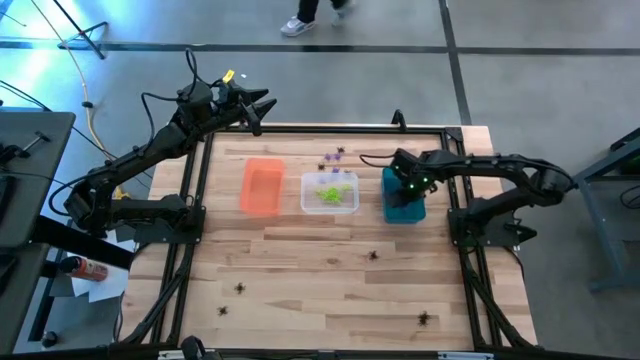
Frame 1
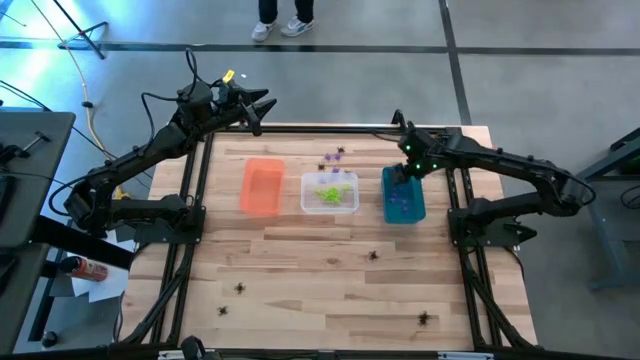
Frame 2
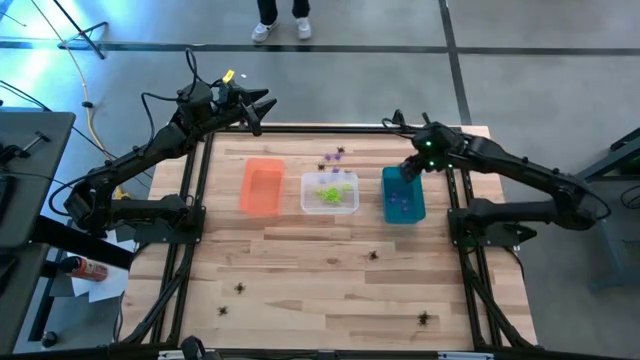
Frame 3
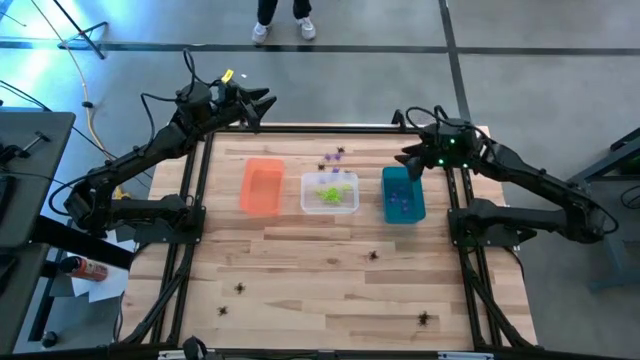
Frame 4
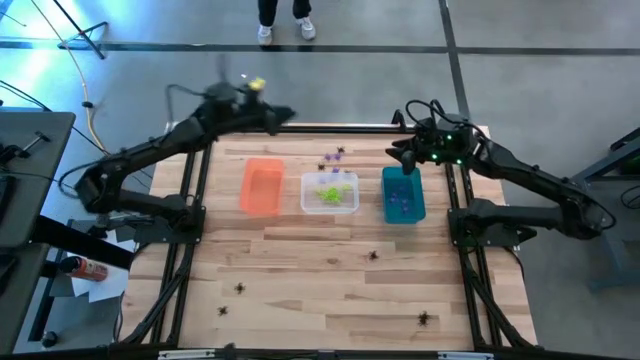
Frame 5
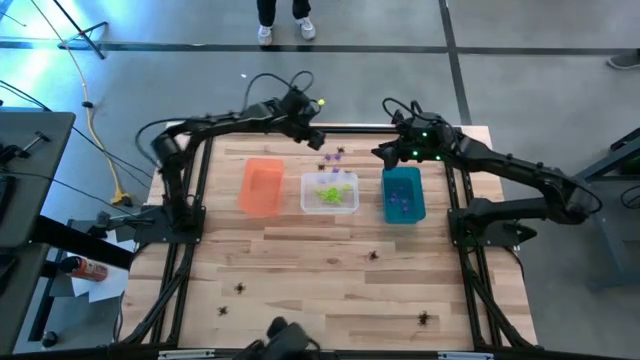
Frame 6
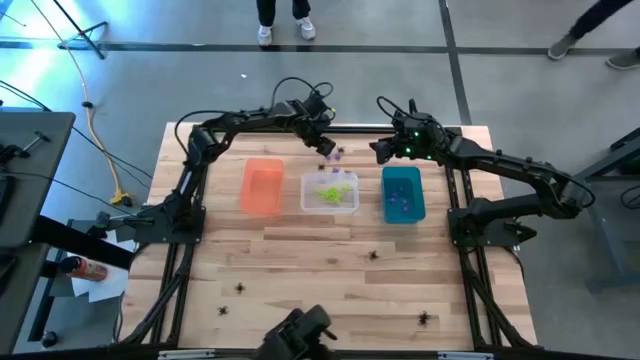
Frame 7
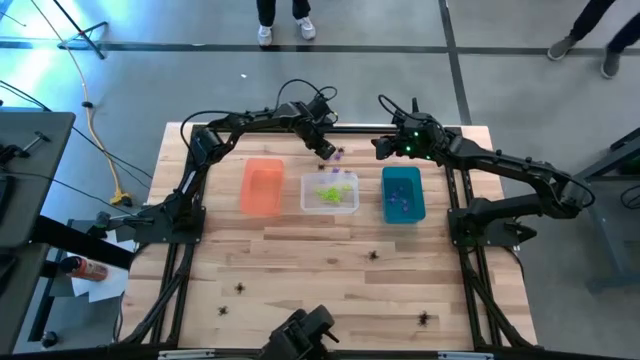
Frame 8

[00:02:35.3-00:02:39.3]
Task: Sort Halloween decoration
Put the purple spider toy into the blue bin

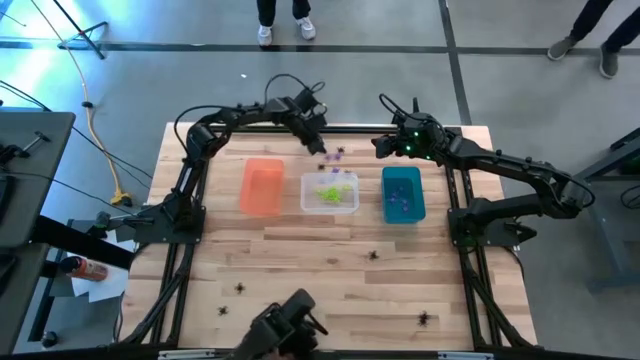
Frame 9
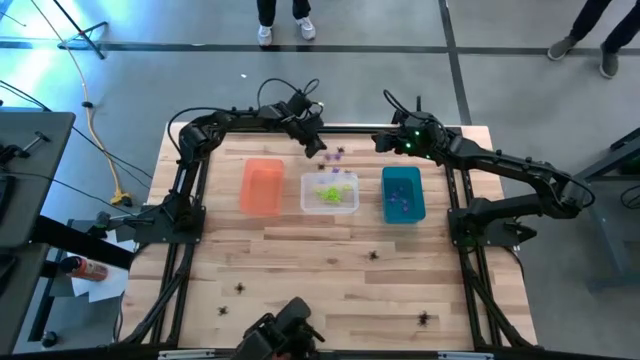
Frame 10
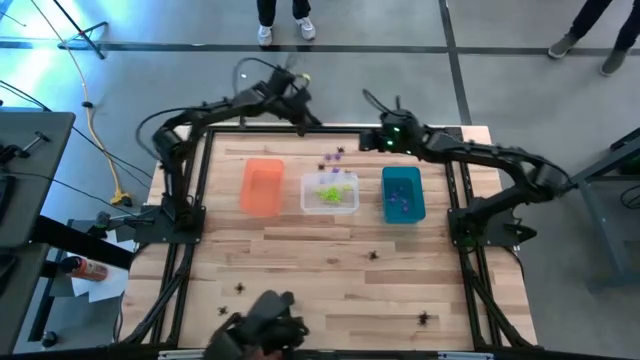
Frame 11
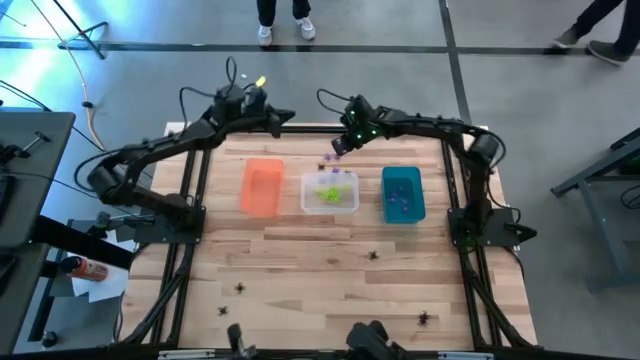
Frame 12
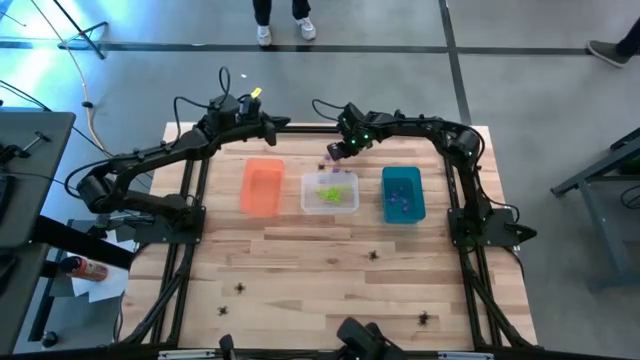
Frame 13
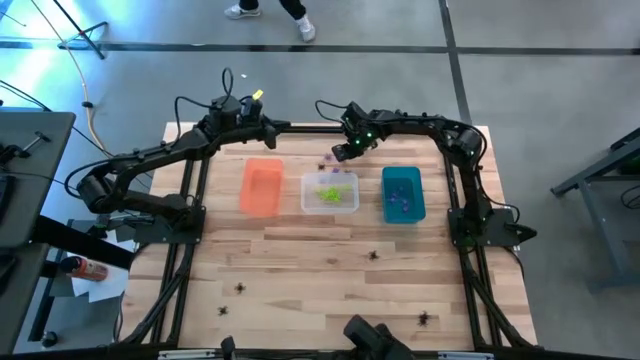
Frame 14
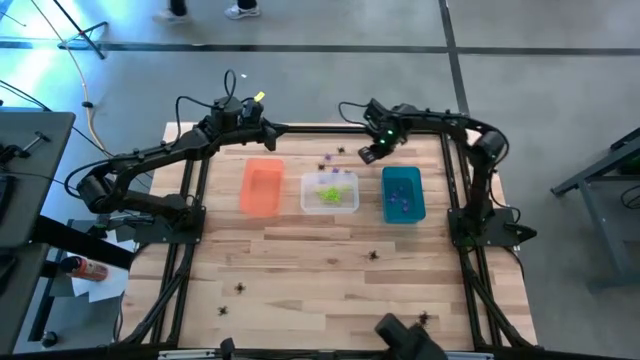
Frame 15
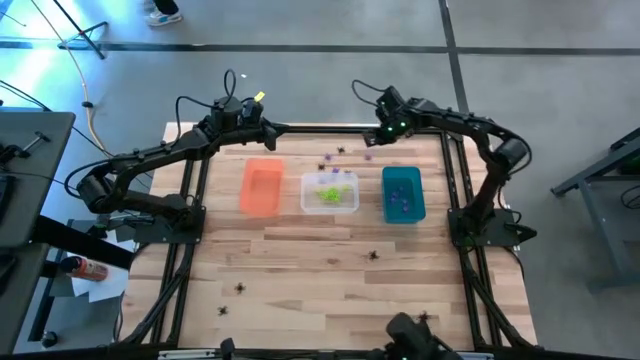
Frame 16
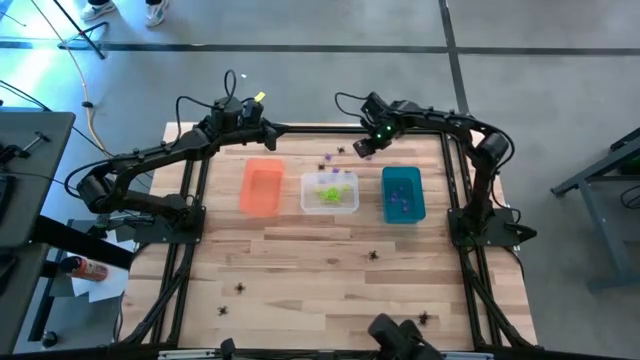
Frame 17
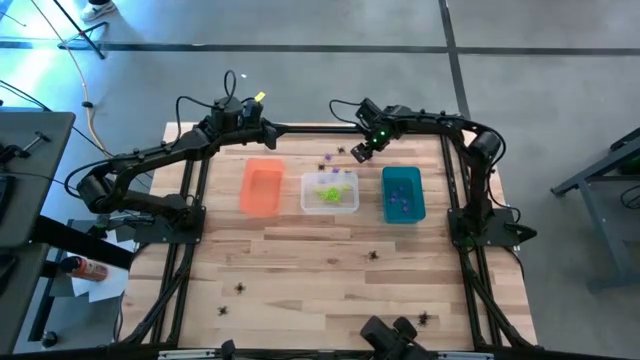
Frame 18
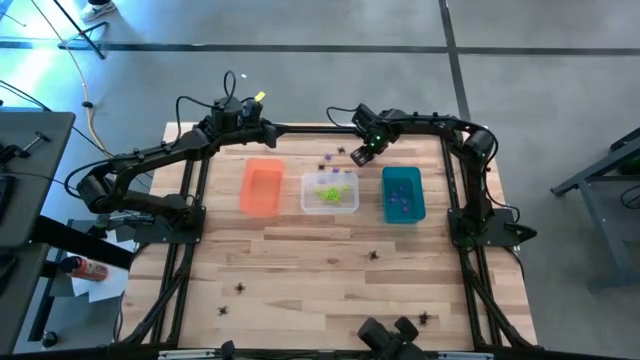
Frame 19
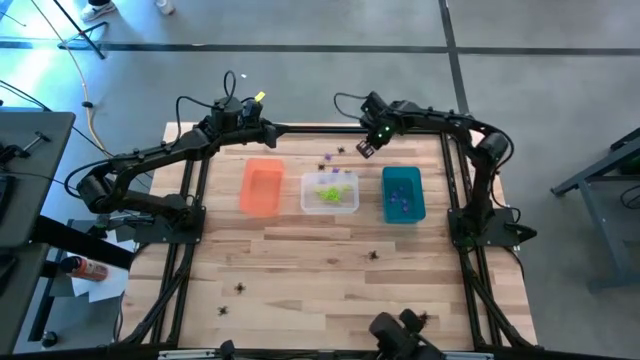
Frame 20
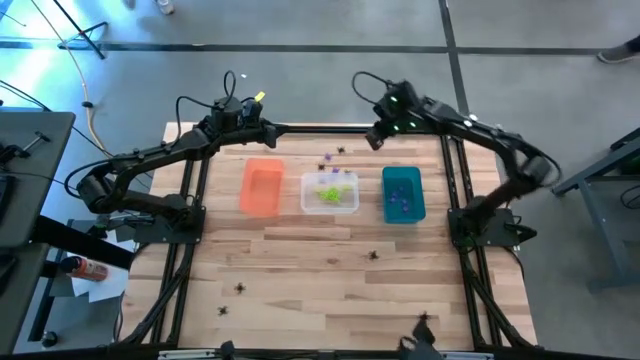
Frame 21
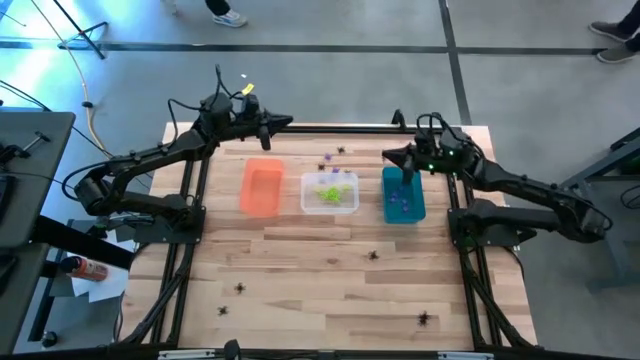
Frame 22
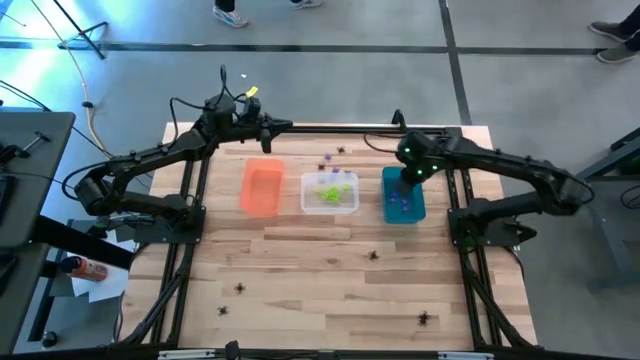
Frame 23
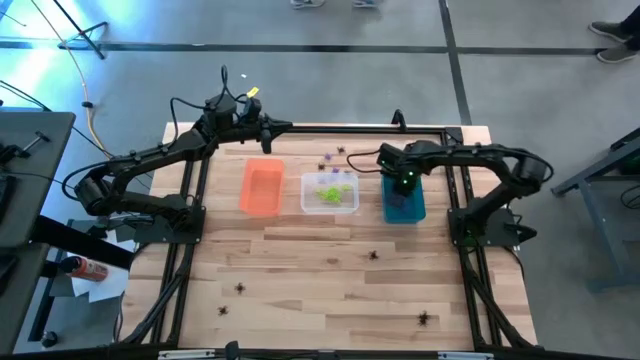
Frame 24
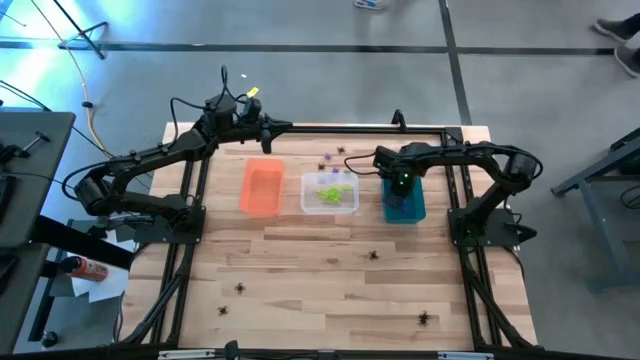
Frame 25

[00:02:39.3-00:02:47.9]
Put the purple spider toy into the blue bin

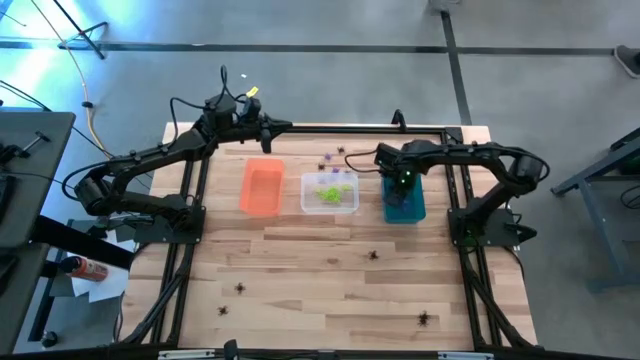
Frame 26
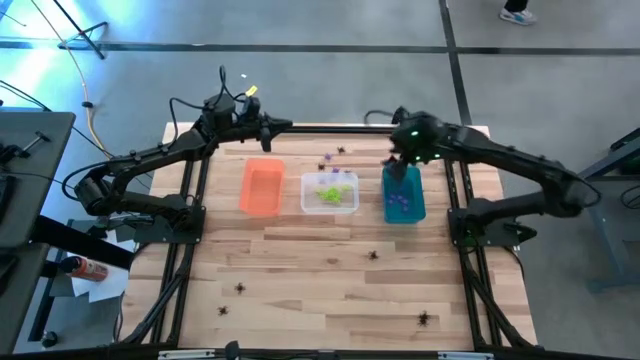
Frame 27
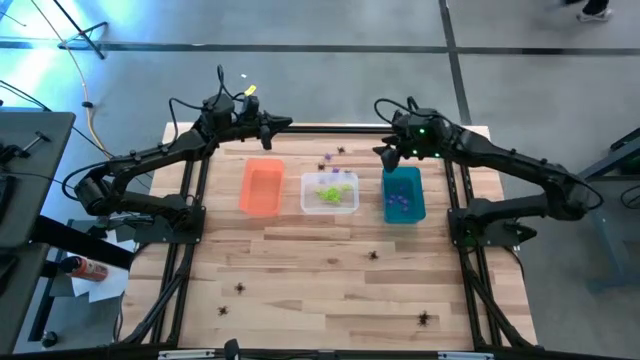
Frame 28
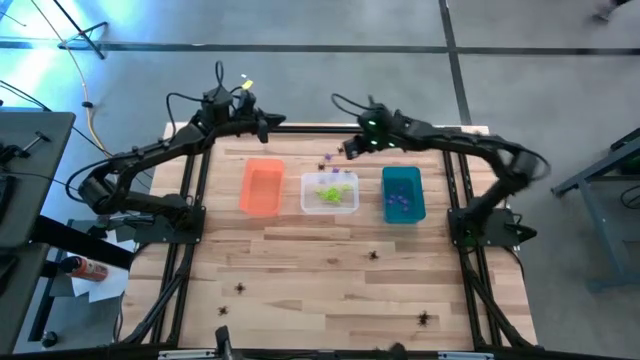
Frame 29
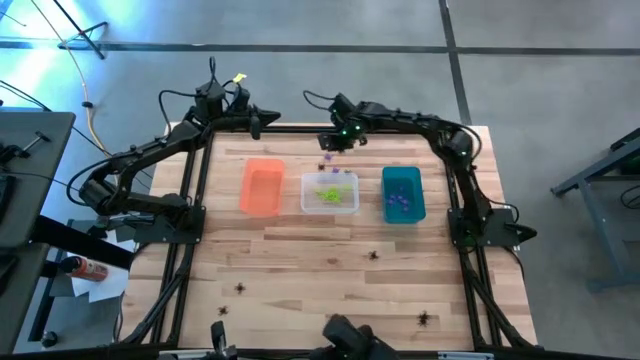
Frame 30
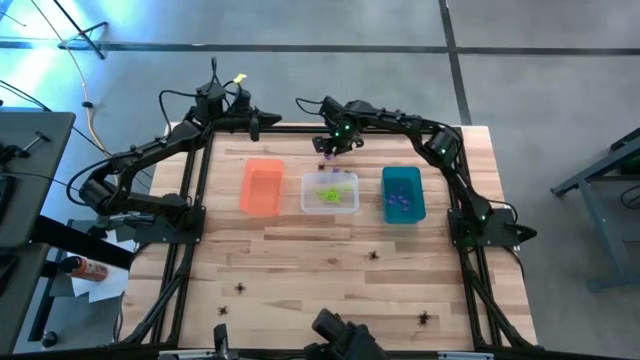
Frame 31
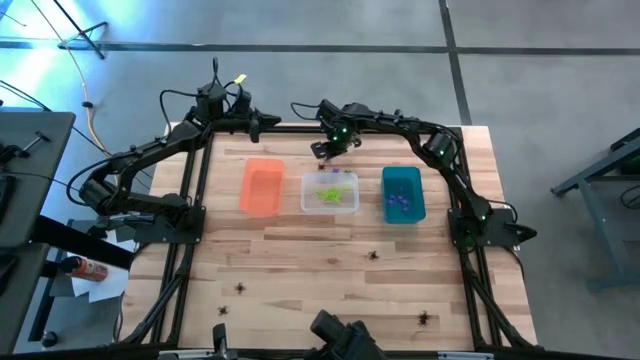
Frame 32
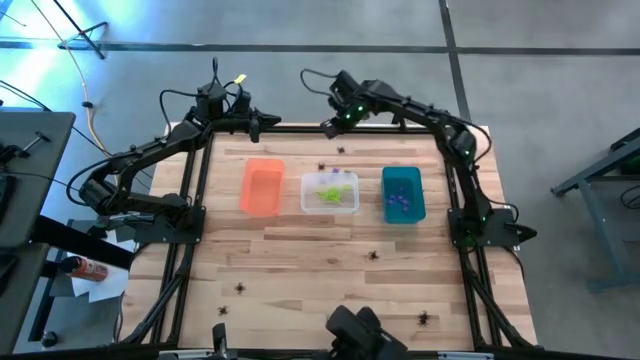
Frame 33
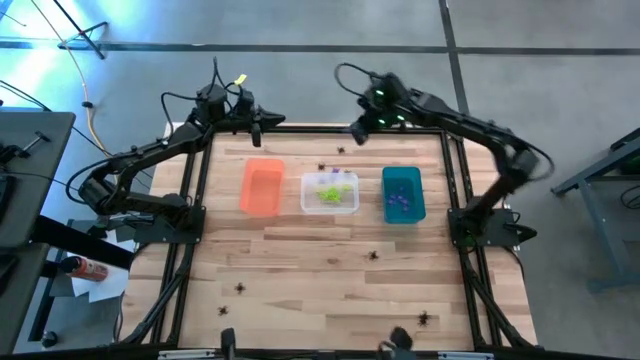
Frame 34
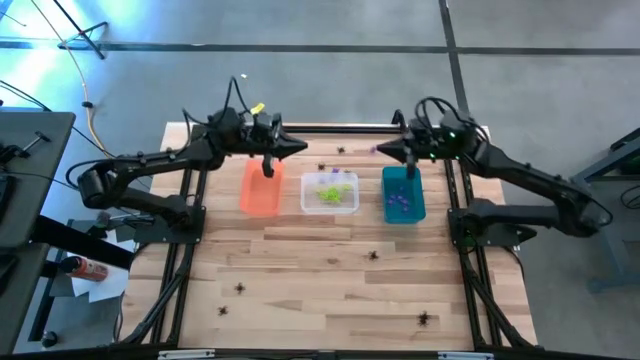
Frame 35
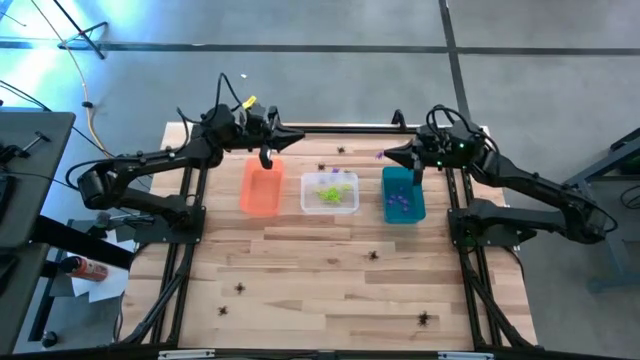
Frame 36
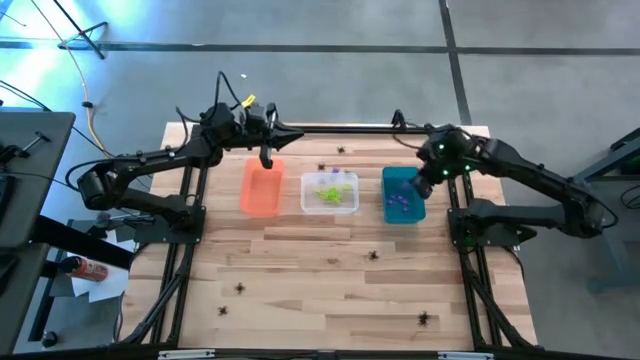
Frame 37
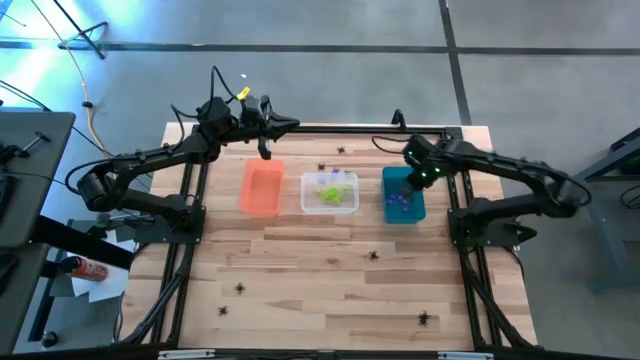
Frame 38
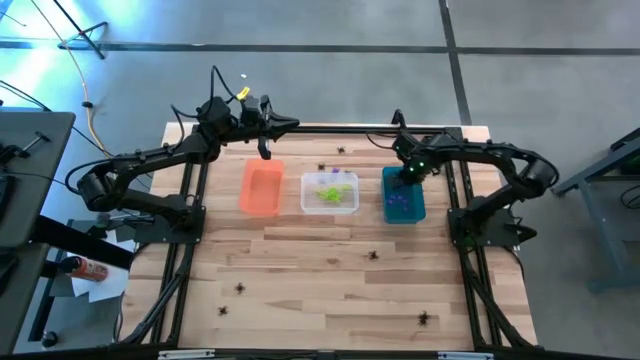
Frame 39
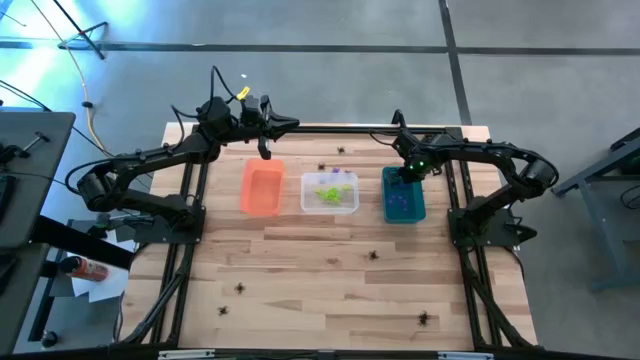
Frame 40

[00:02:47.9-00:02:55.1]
Put the purple spider toy into the blue bin

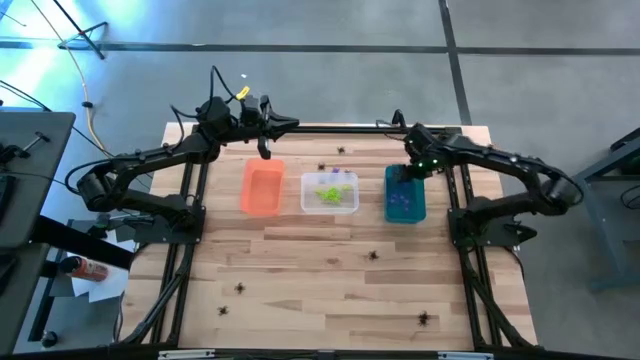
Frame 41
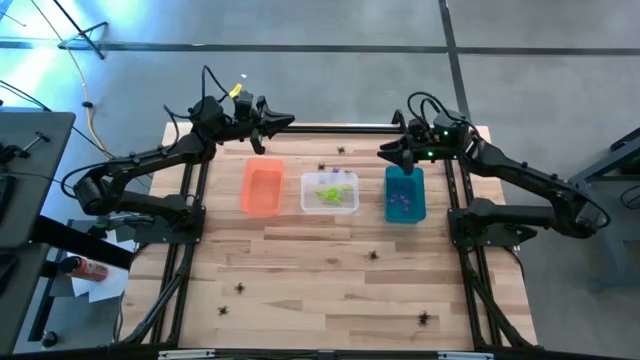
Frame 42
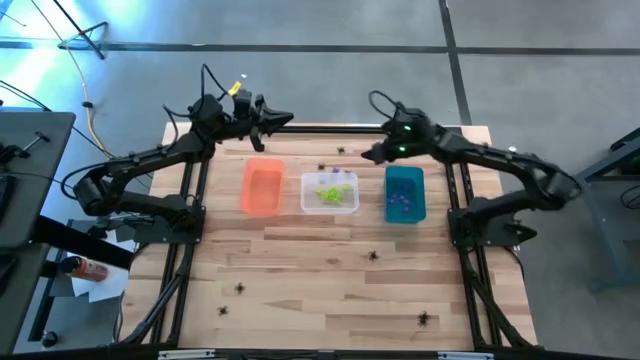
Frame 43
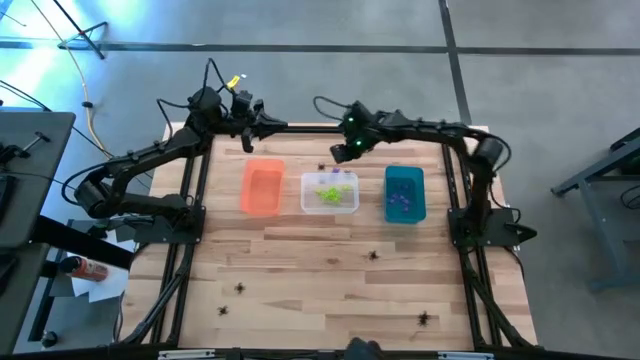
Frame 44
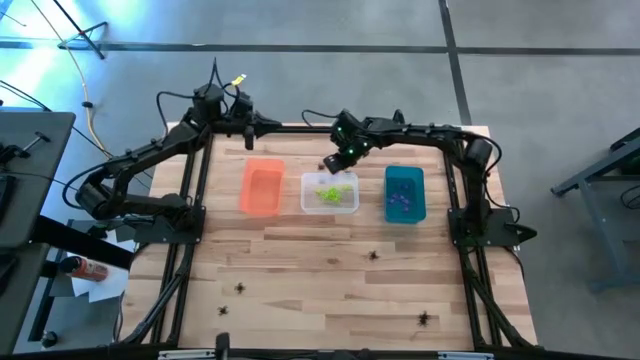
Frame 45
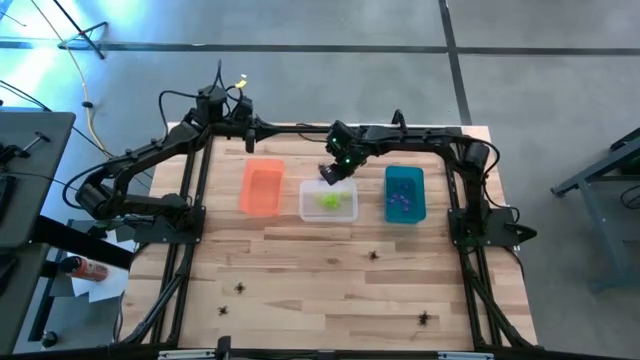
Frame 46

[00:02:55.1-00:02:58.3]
Adjust the transparent bin
